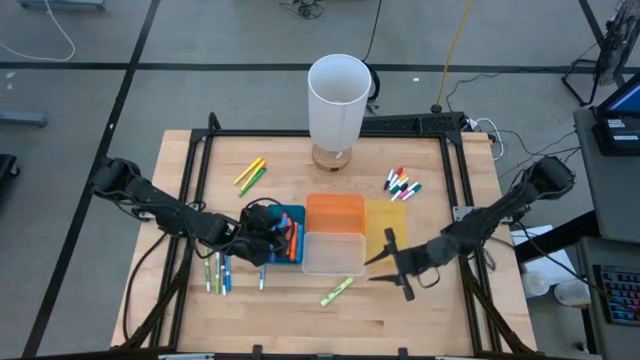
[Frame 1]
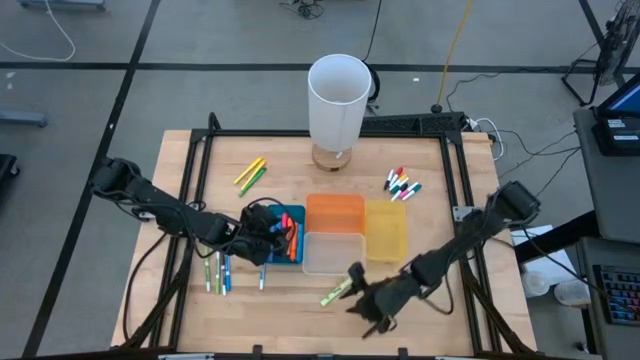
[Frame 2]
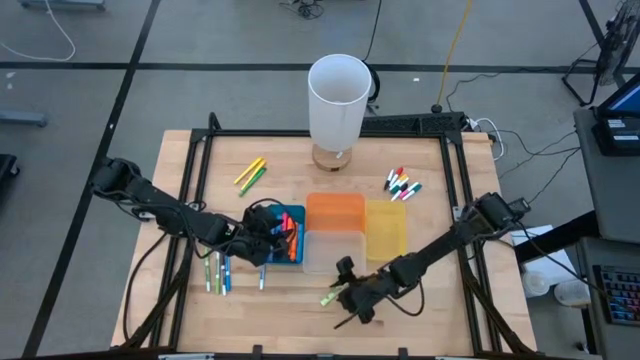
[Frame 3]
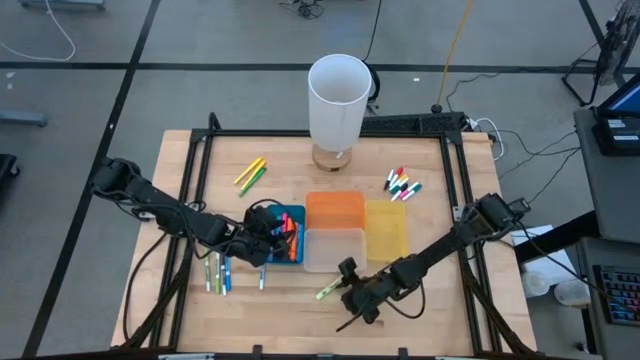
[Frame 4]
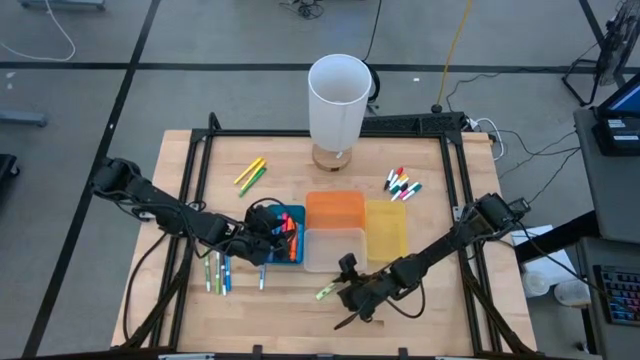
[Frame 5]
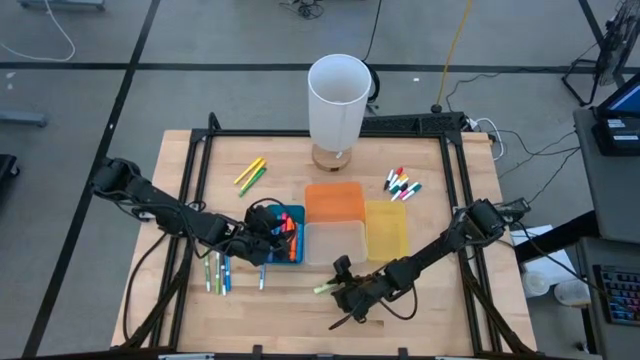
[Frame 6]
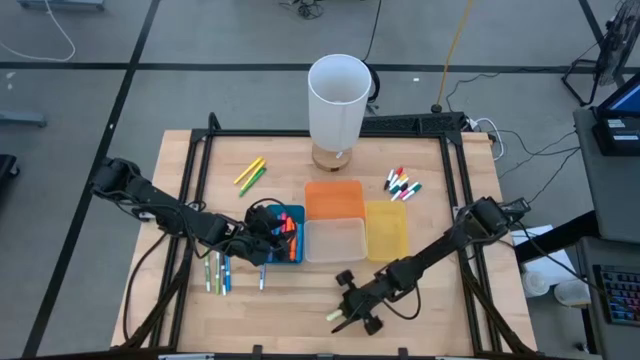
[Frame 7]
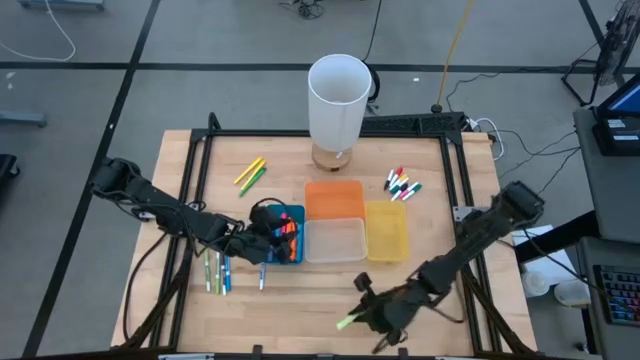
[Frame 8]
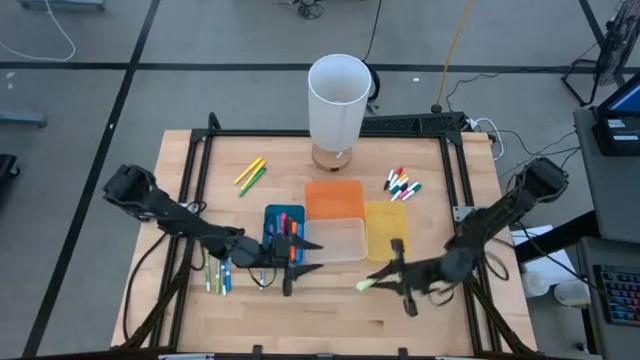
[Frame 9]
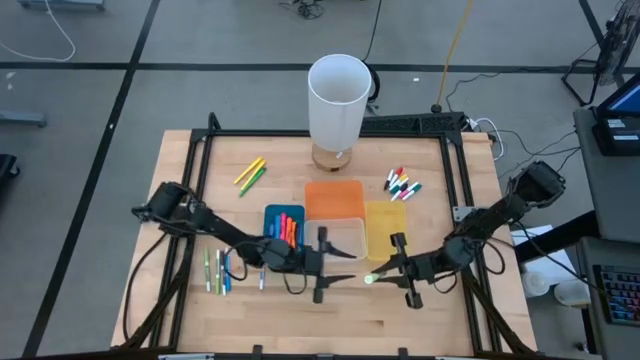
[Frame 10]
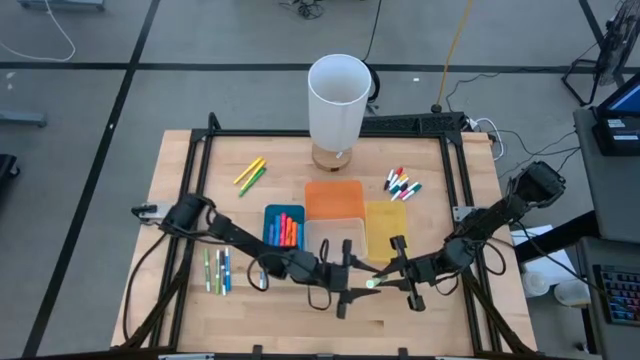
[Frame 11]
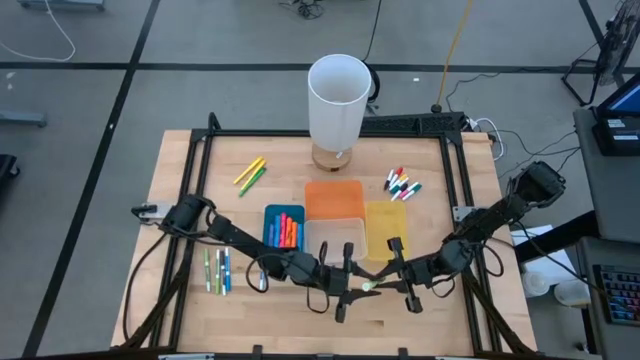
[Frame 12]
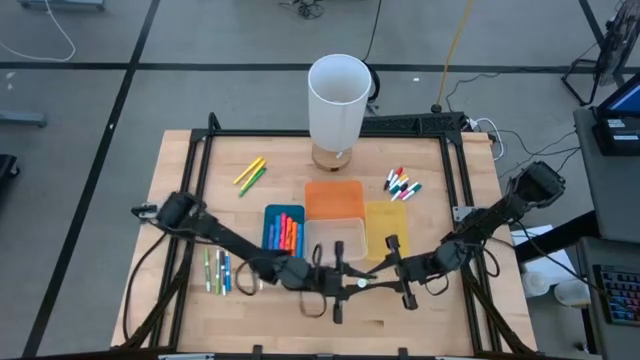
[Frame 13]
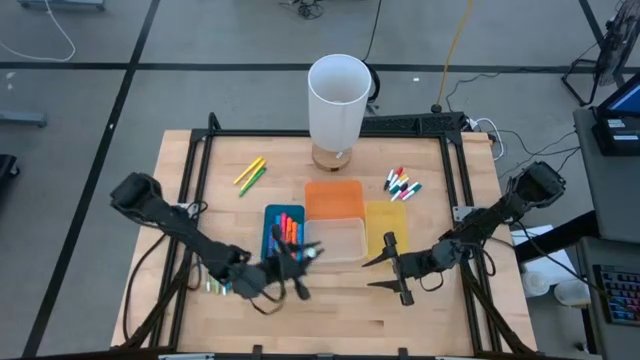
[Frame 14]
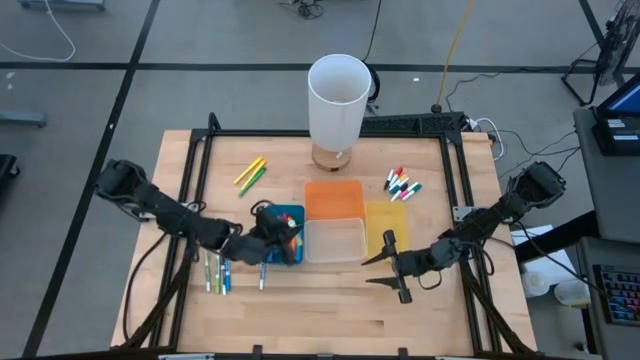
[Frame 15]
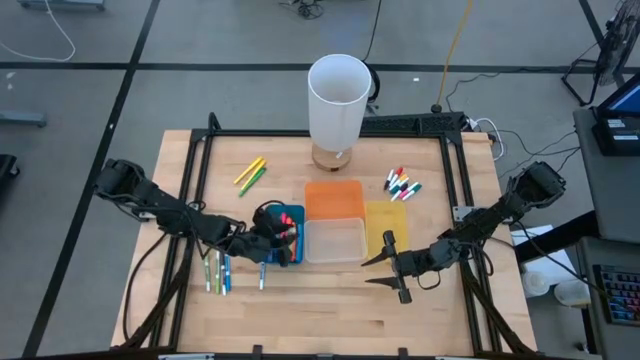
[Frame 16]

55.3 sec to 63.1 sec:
Task: Pick & Place Markers
Put the large green highlighter pen into the blue bin

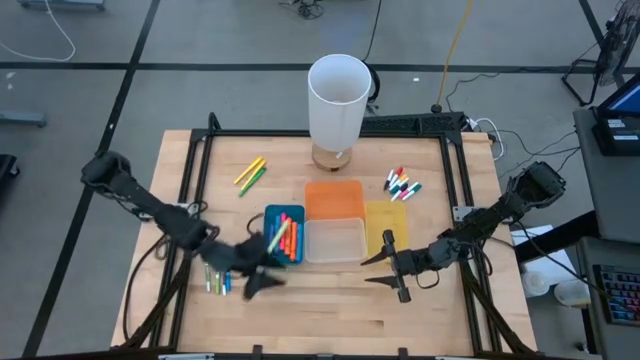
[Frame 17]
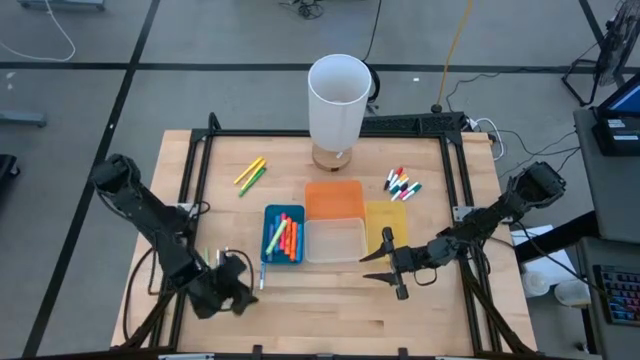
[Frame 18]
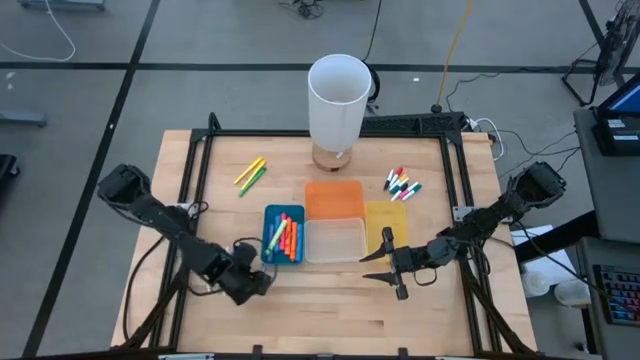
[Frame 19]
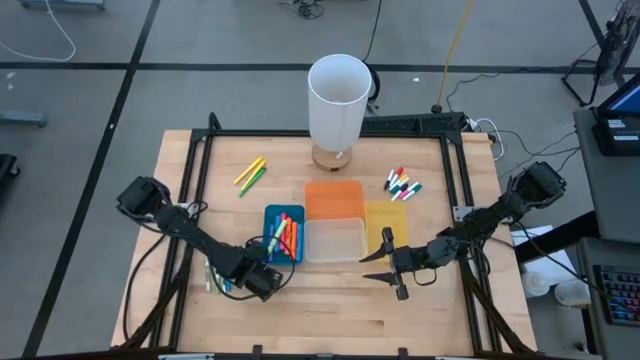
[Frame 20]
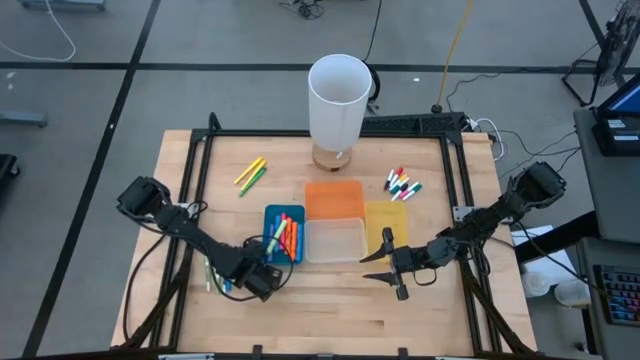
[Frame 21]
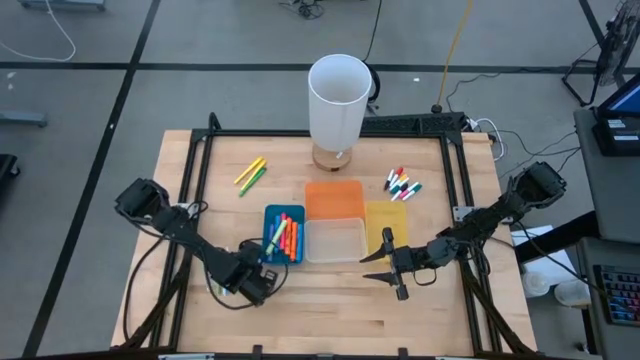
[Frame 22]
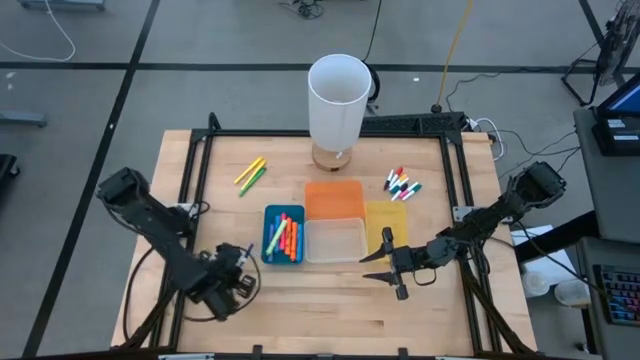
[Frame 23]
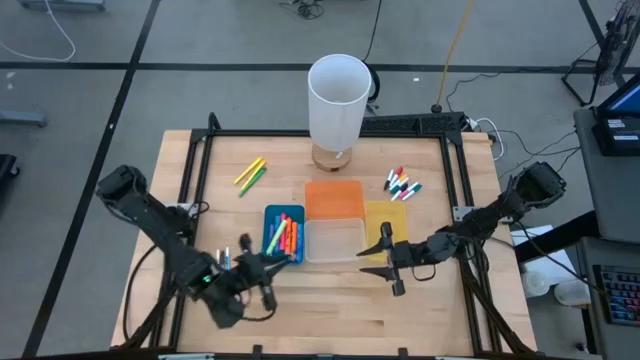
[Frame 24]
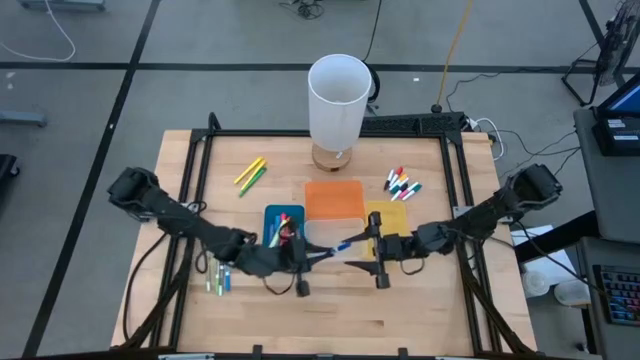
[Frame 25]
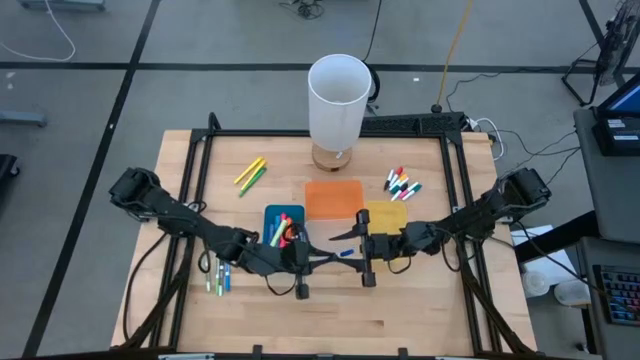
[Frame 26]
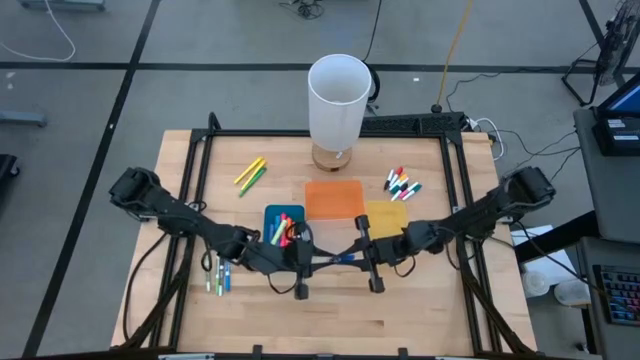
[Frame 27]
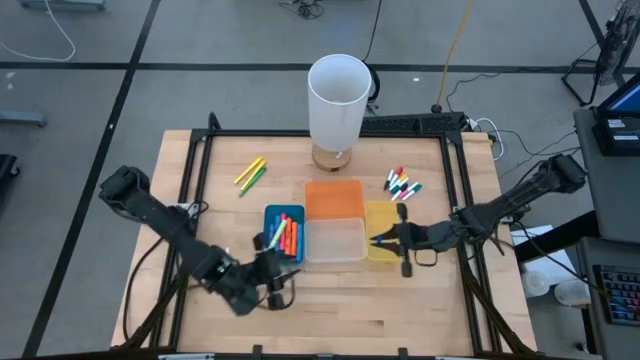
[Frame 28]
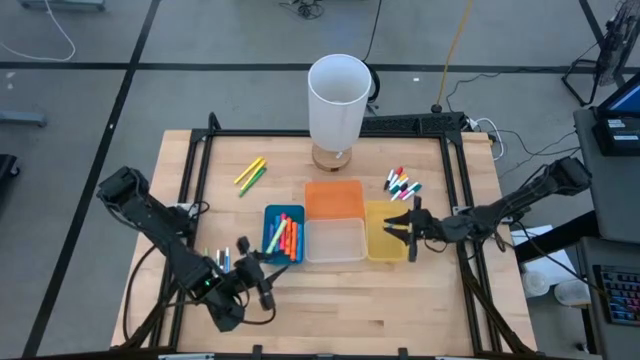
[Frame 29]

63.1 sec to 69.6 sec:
Put the right blue marker pen into the yellow bin

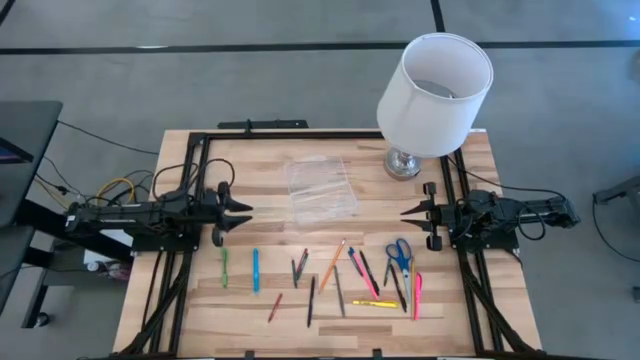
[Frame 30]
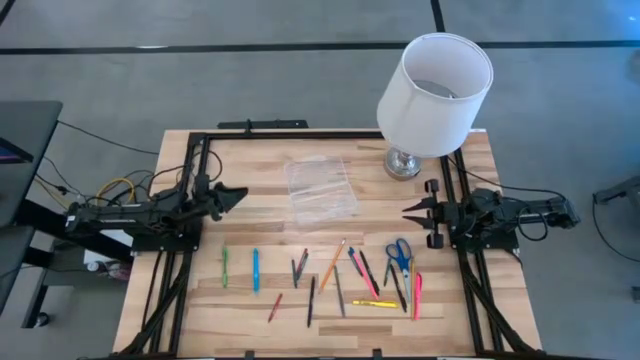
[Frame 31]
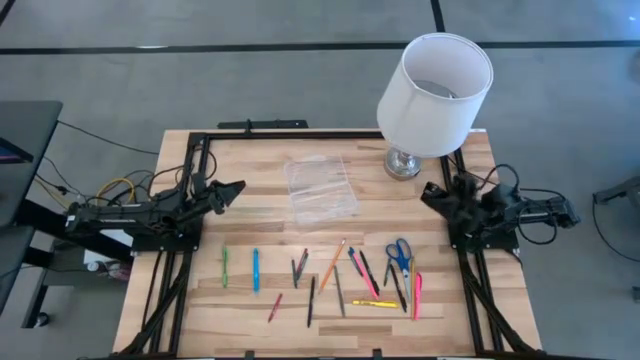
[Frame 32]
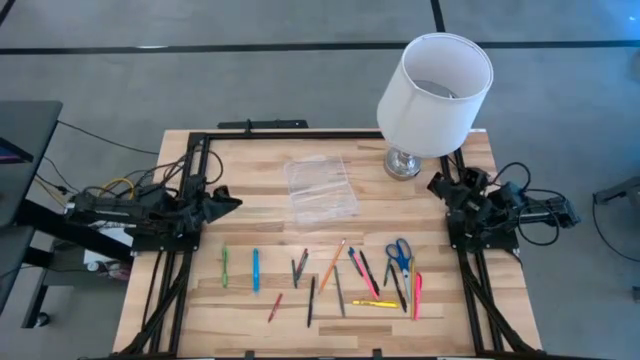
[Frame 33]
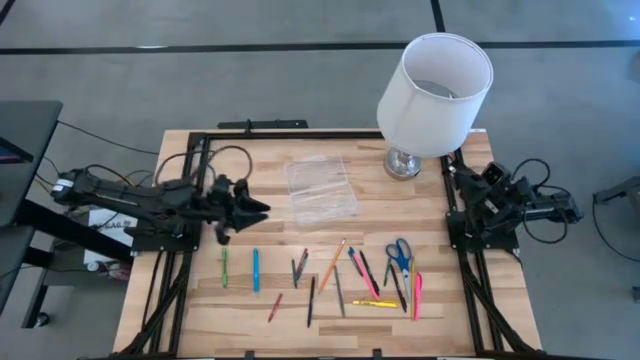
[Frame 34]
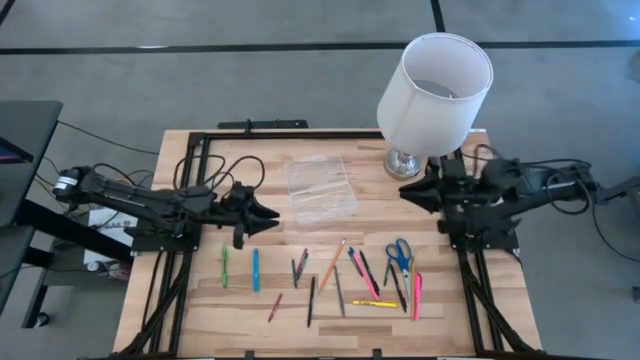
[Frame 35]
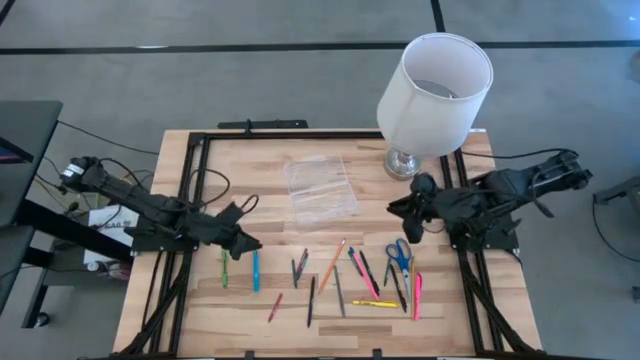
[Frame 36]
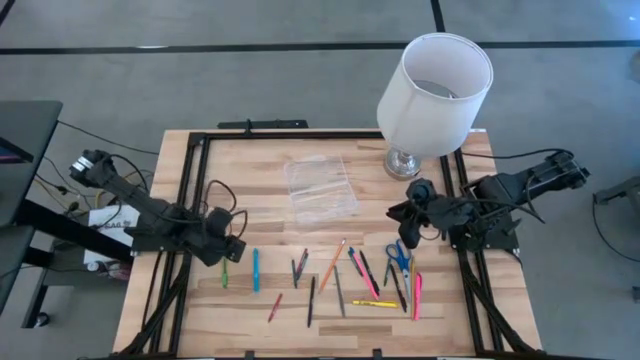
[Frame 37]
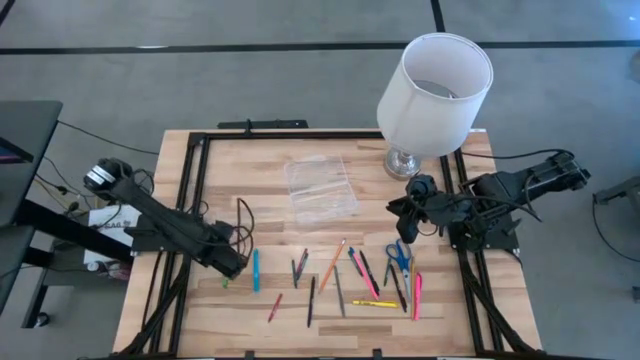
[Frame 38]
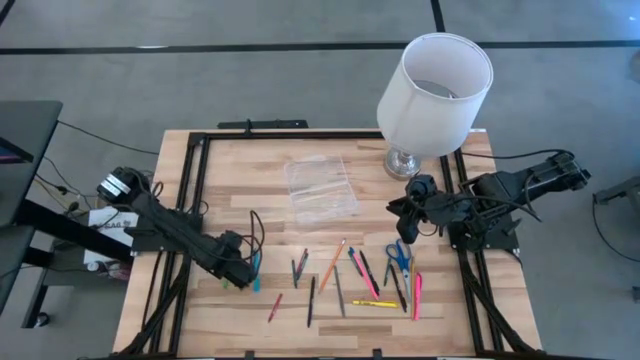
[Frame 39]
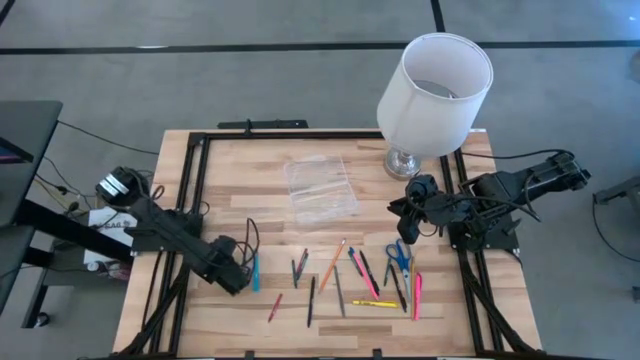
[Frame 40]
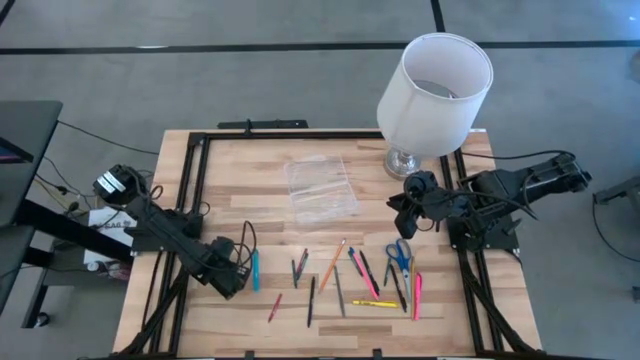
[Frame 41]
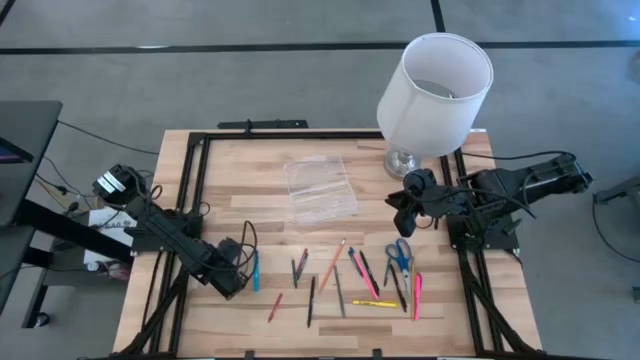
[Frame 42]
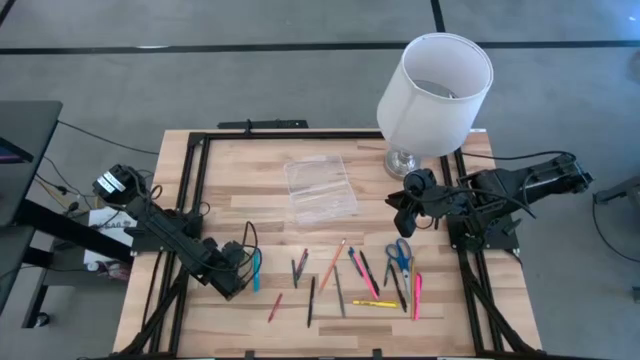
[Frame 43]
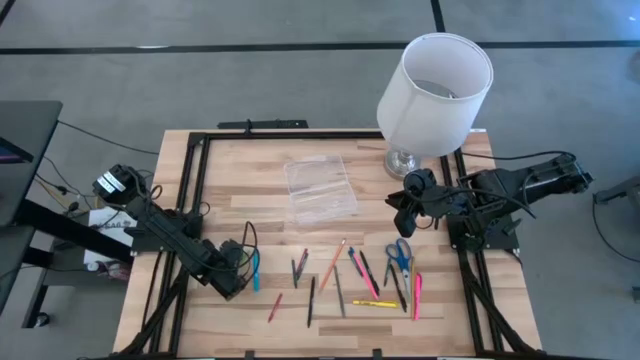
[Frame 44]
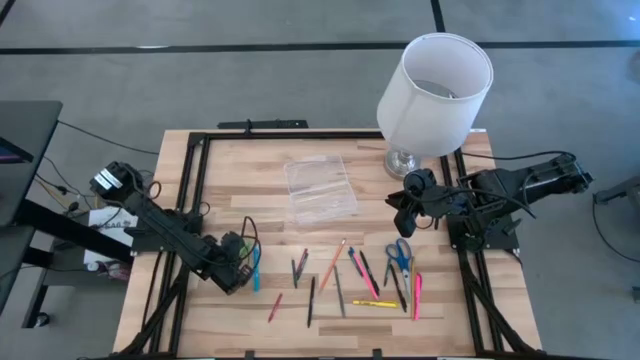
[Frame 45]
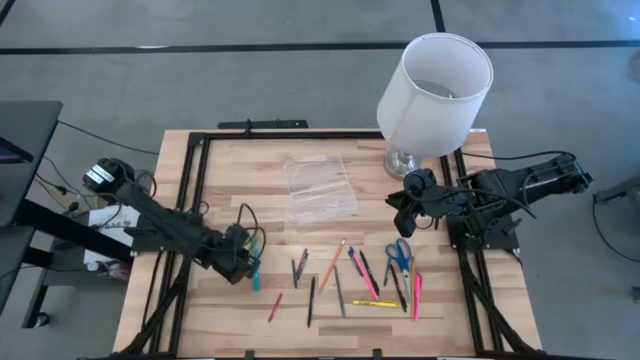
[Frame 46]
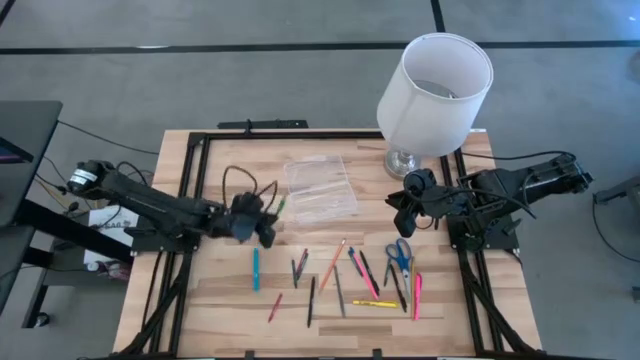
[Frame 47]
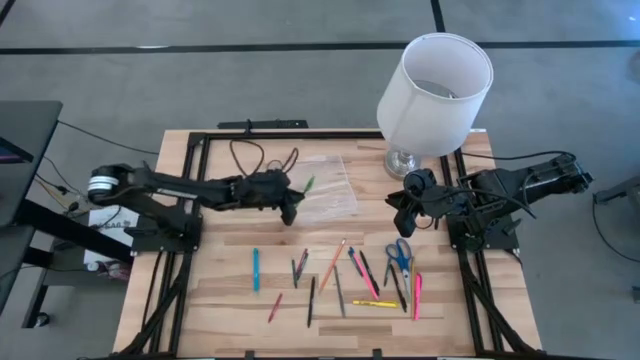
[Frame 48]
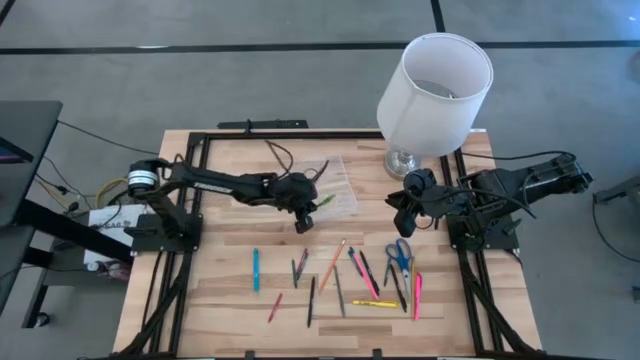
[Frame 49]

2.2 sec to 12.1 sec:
Task: Pick & place school supplies into a supply box
Put the green ballpen into the transparent supply box
